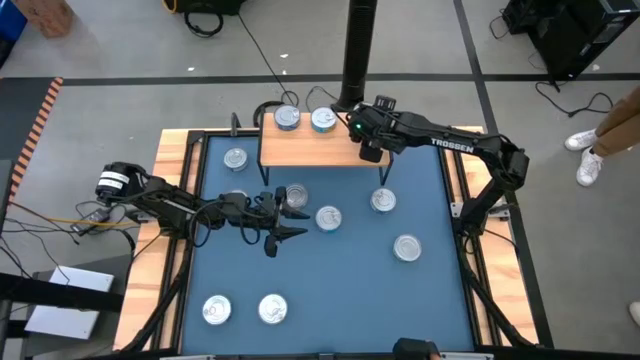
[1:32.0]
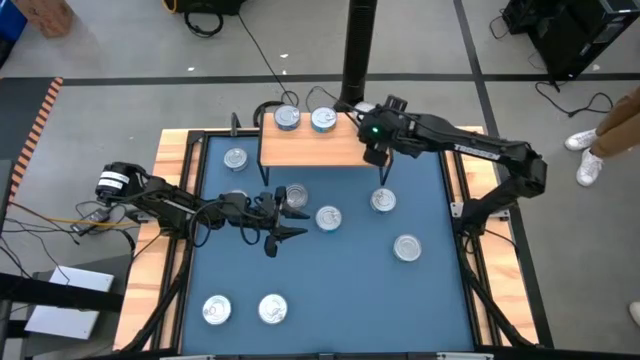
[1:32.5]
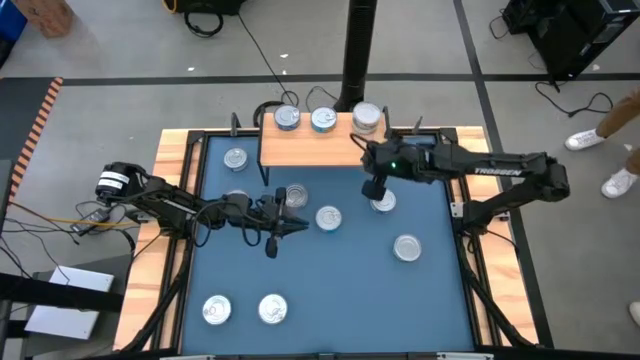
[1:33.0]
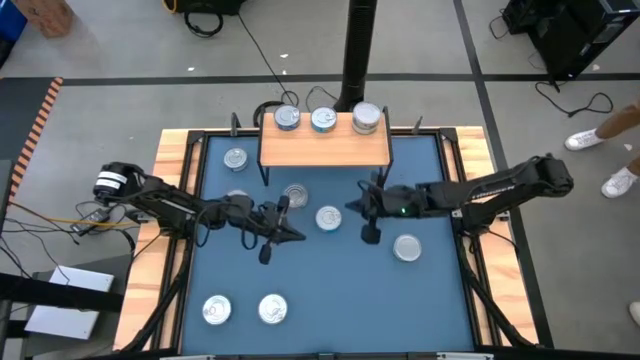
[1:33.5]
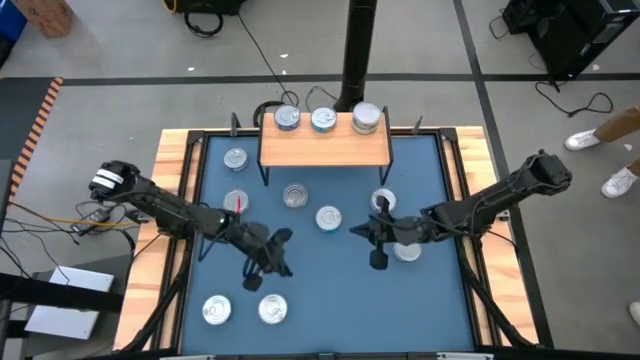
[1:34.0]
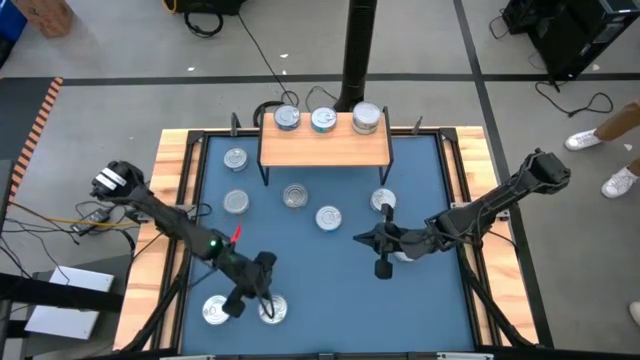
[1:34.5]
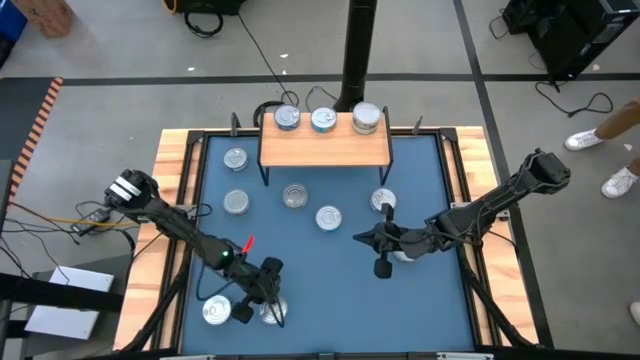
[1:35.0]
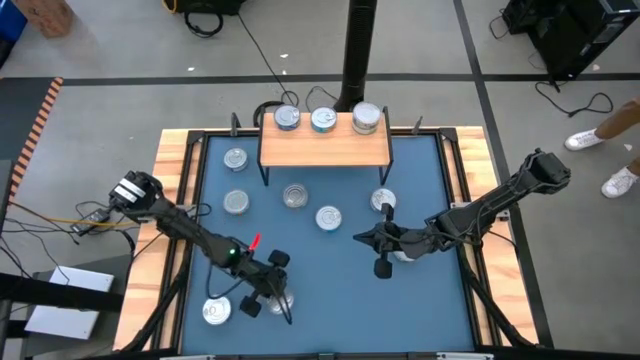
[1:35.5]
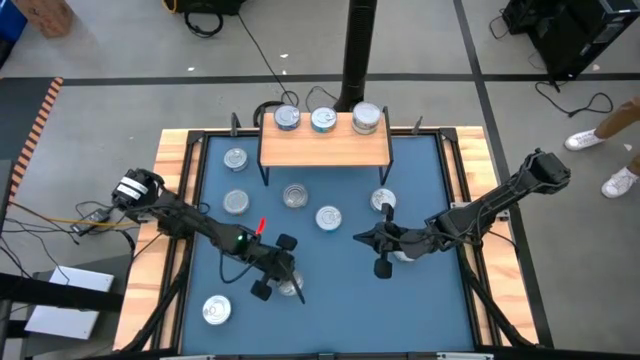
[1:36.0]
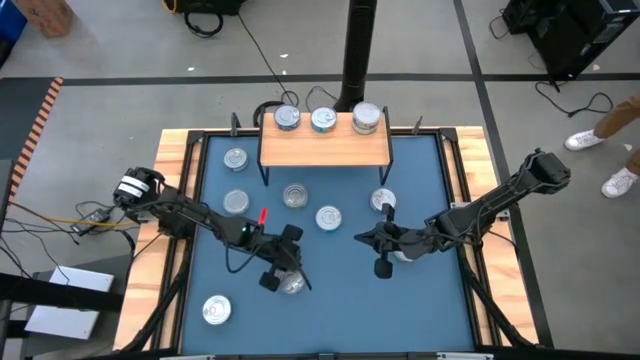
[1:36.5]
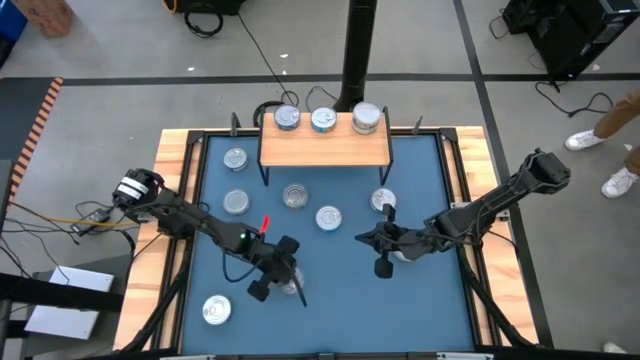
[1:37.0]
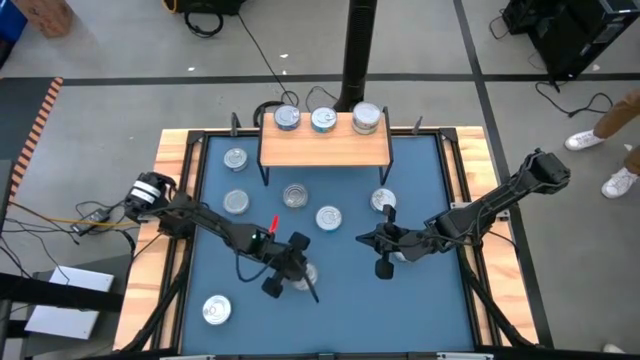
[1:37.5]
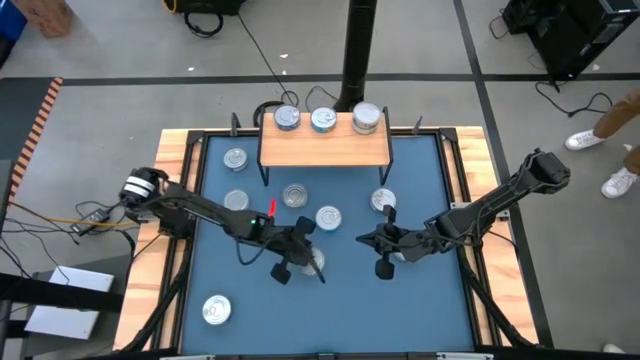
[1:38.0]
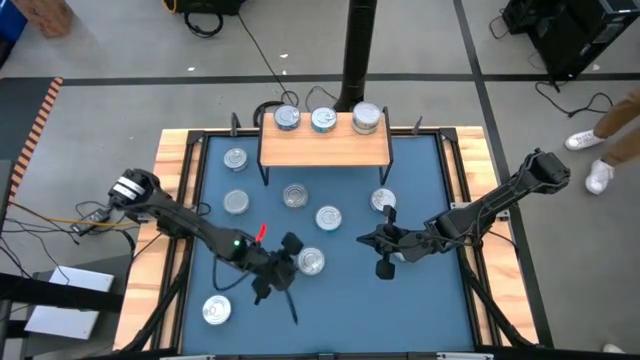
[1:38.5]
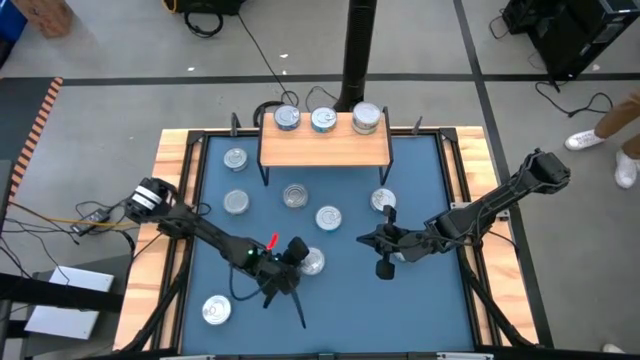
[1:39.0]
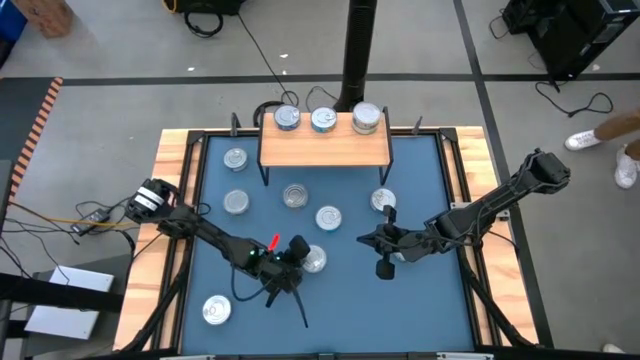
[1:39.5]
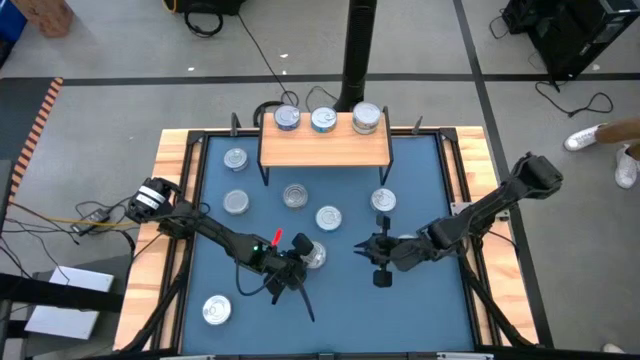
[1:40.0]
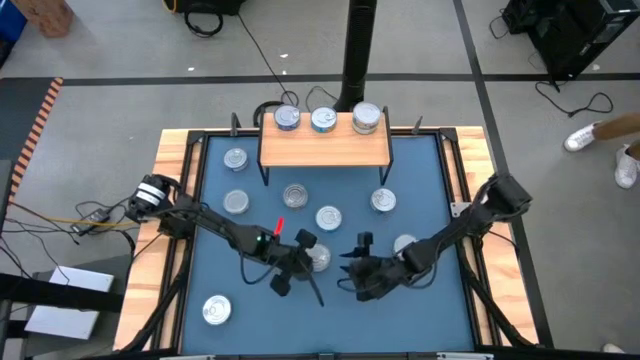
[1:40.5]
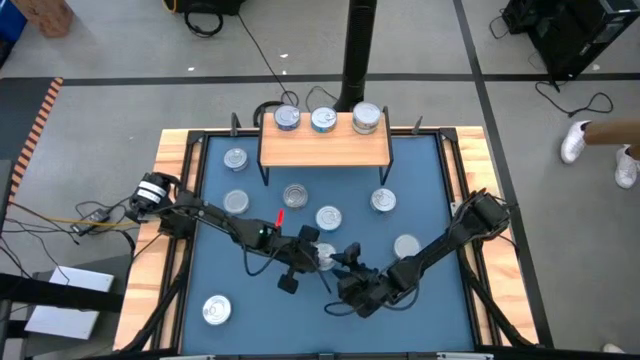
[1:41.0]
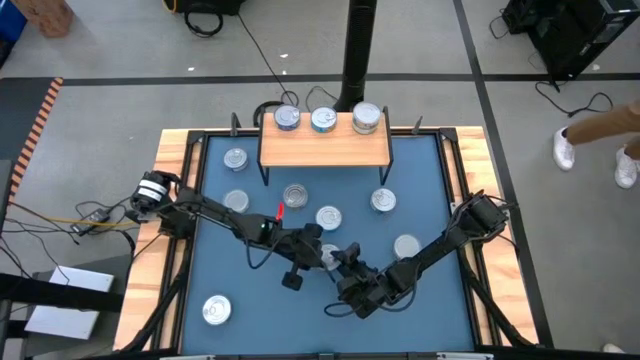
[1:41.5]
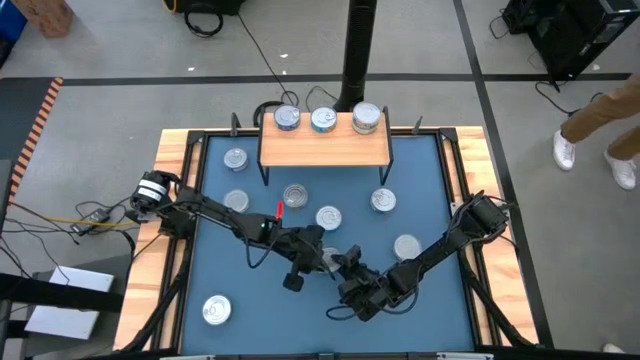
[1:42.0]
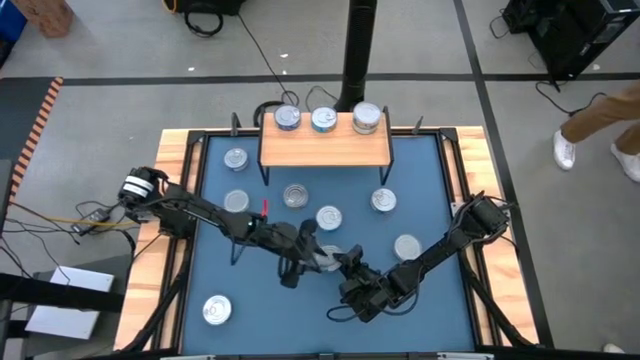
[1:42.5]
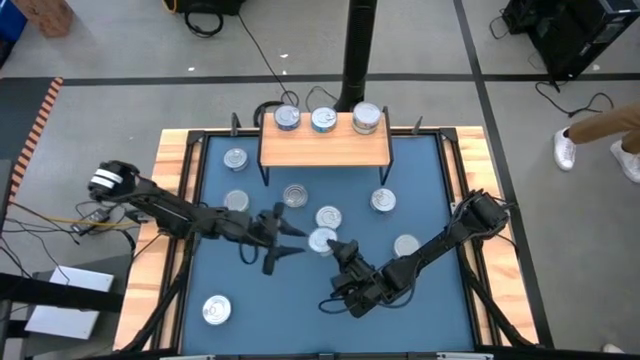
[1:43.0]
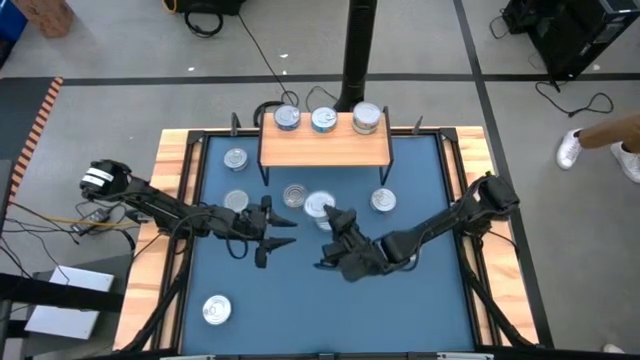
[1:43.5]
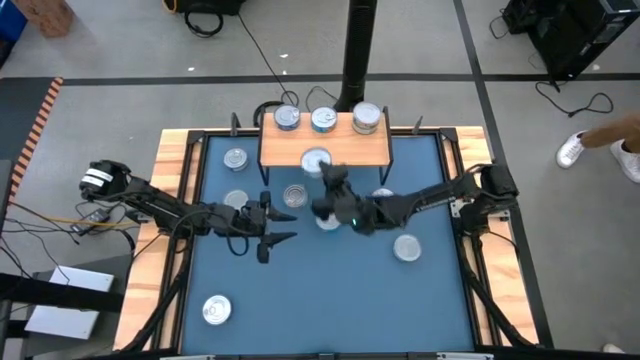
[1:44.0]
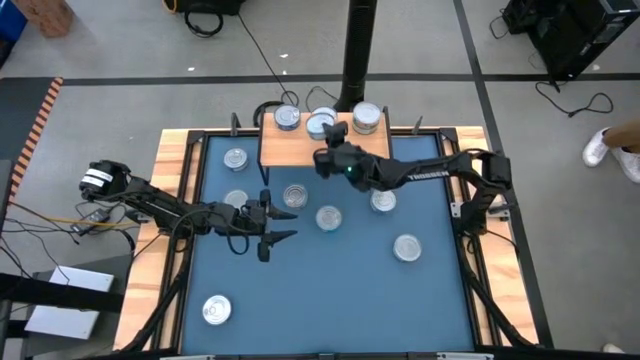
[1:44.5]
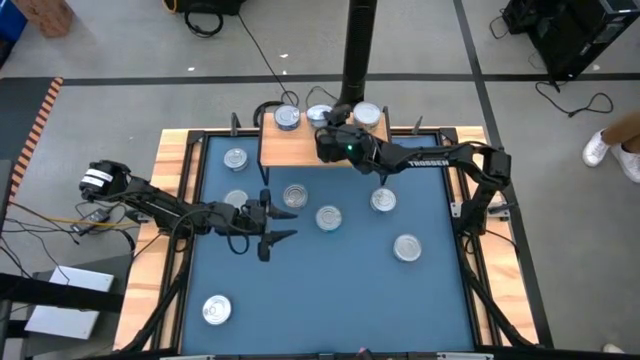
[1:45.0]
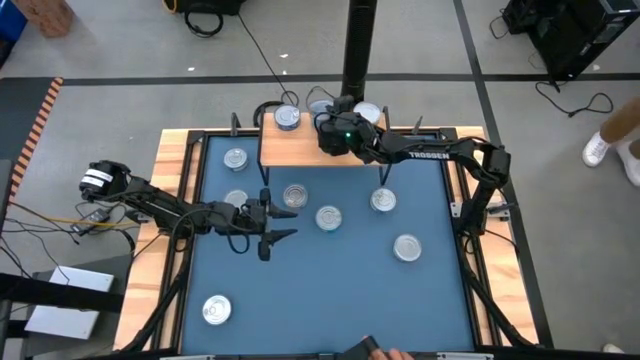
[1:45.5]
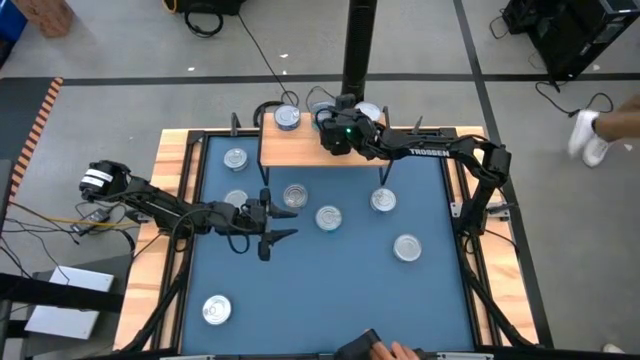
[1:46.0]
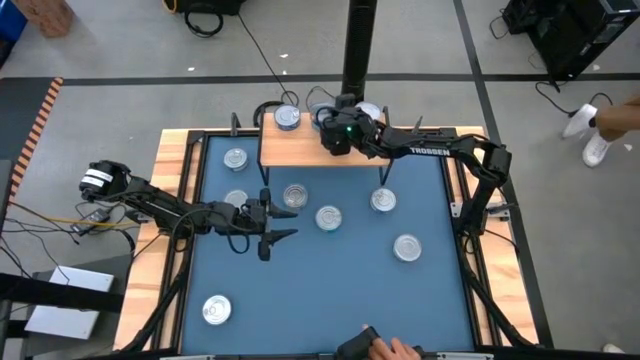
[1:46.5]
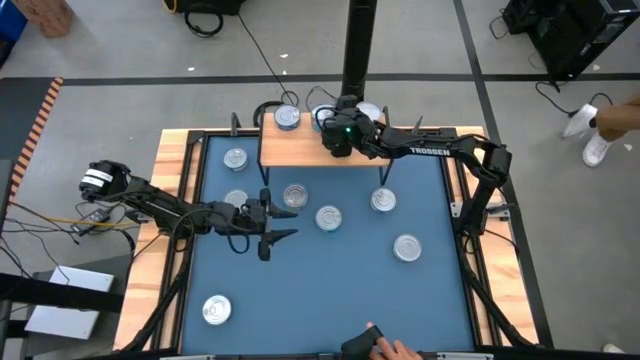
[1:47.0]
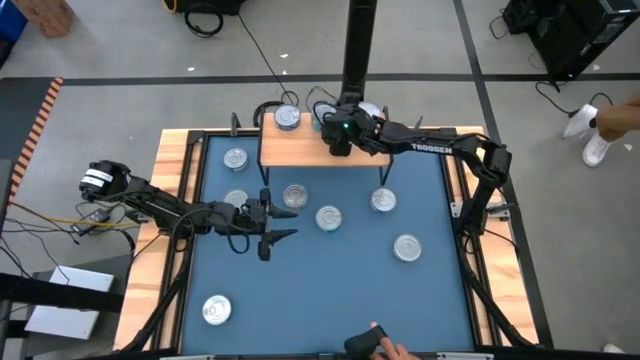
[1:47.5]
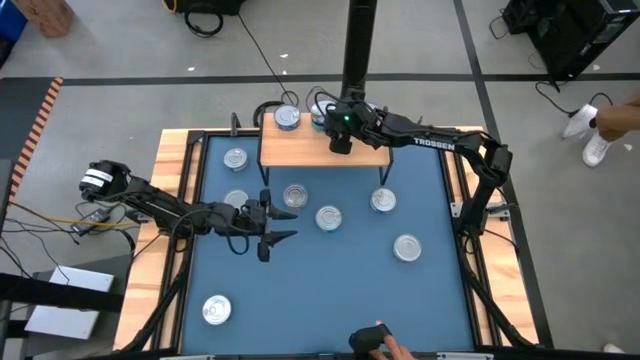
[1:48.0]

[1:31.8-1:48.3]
Task: Stack canned seafood by type on shelf
Stack the light blue tuna can on top of the light blue tuna can on the shelf

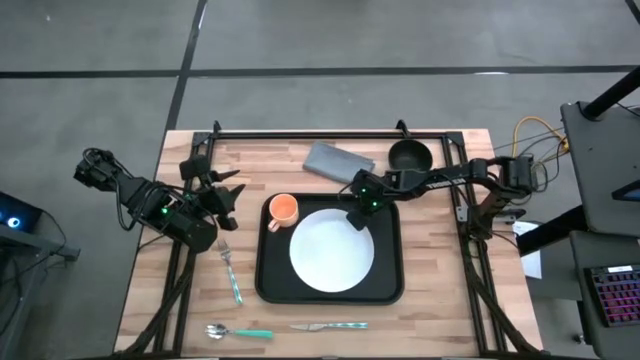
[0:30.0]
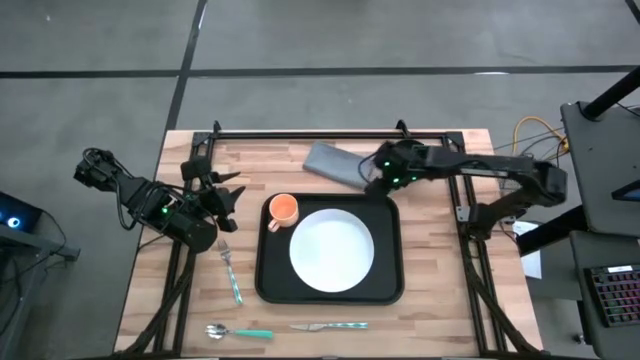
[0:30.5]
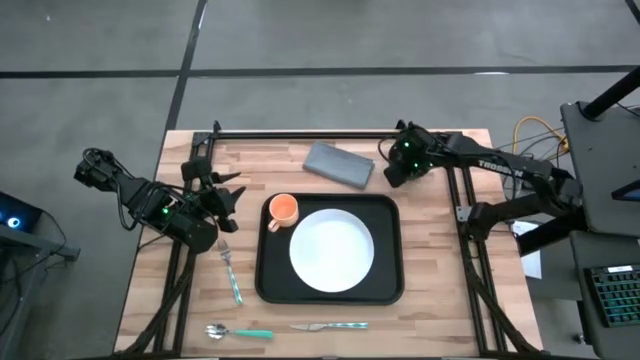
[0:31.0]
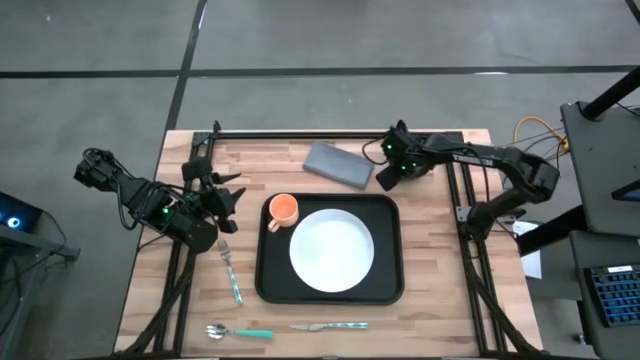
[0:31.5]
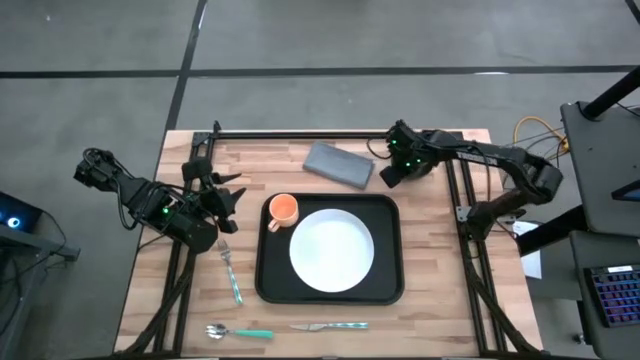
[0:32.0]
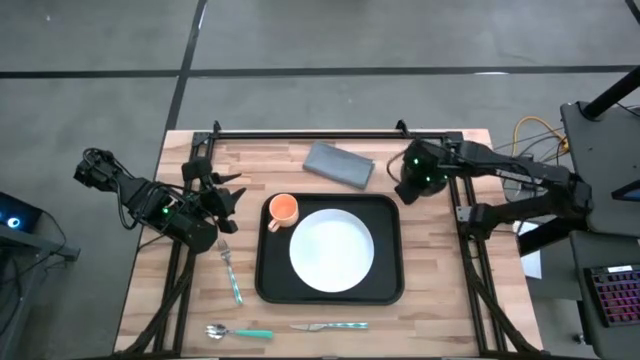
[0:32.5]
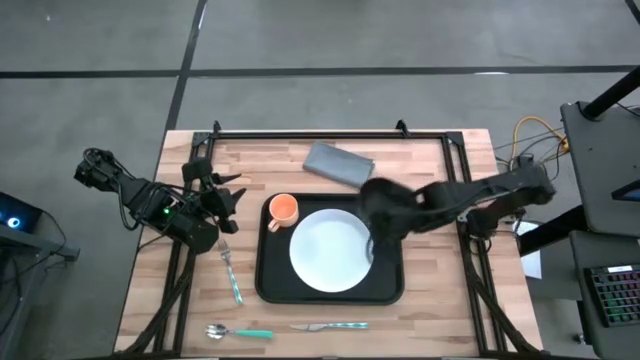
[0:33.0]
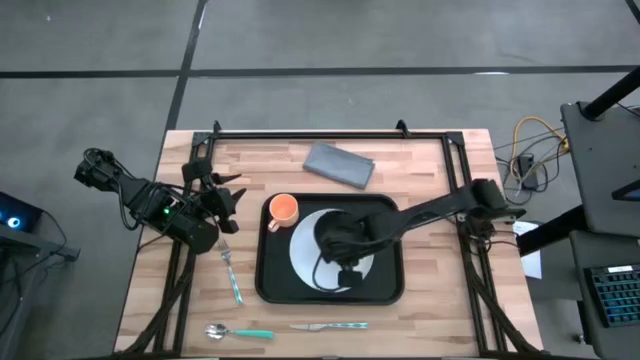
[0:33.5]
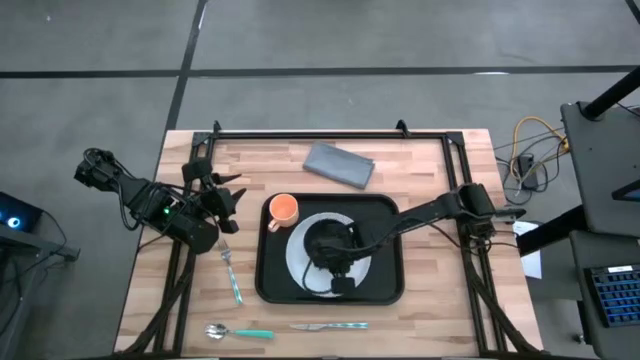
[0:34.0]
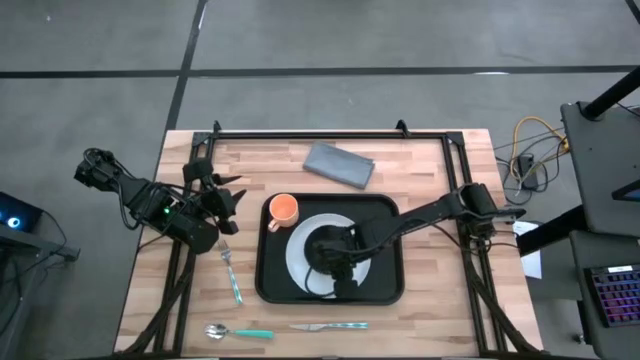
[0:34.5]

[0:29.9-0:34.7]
Task: Set up tray
Put the black bowl on top of the white plate on the black serving tray

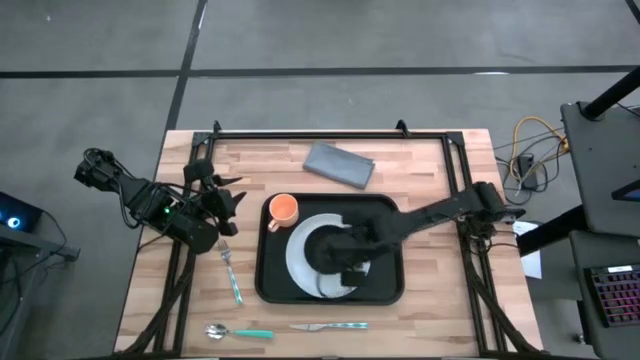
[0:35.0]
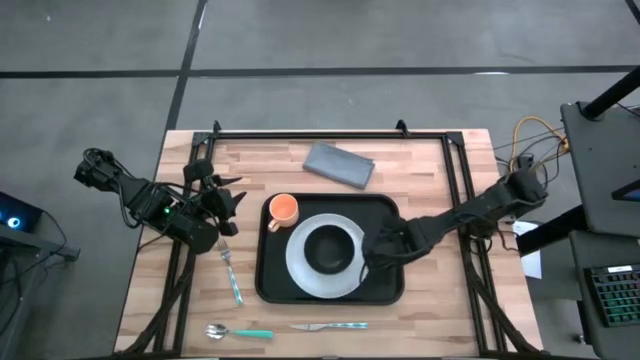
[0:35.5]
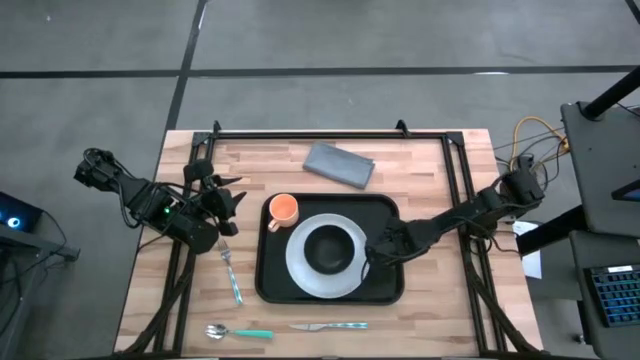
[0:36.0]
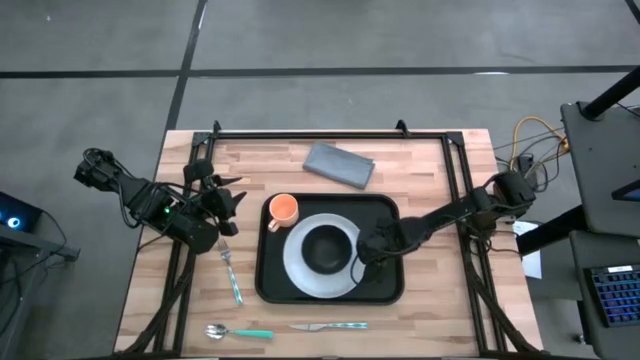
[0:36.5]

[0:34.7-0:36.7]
Adjust the white plate on the black serving tray
